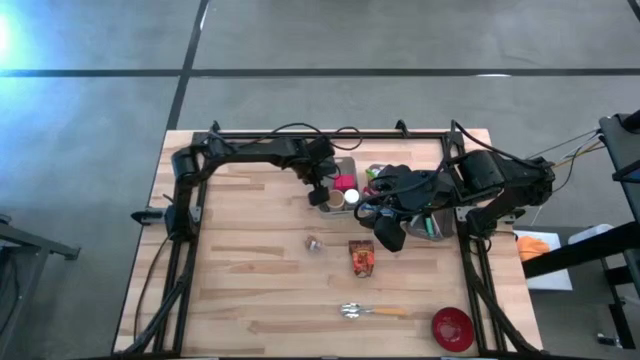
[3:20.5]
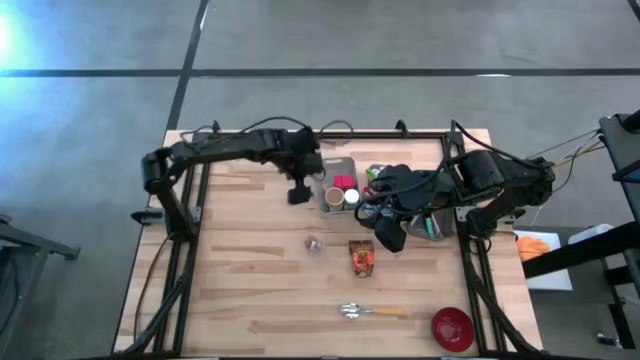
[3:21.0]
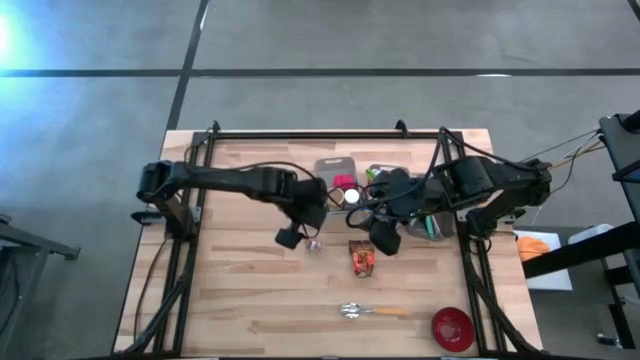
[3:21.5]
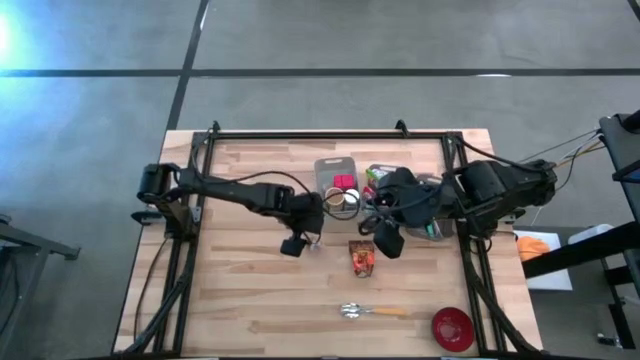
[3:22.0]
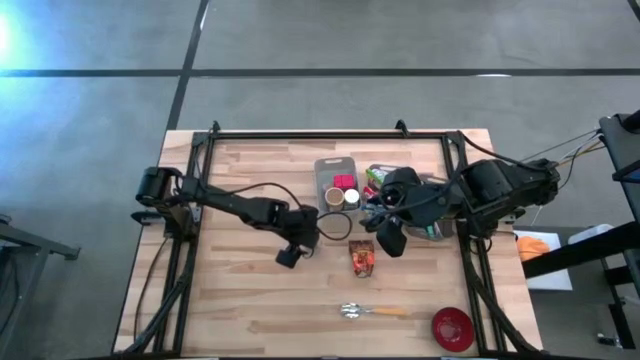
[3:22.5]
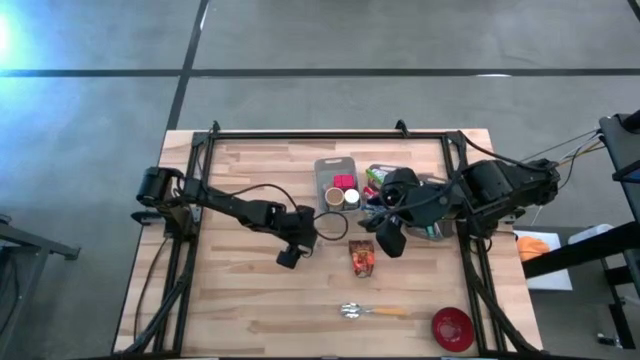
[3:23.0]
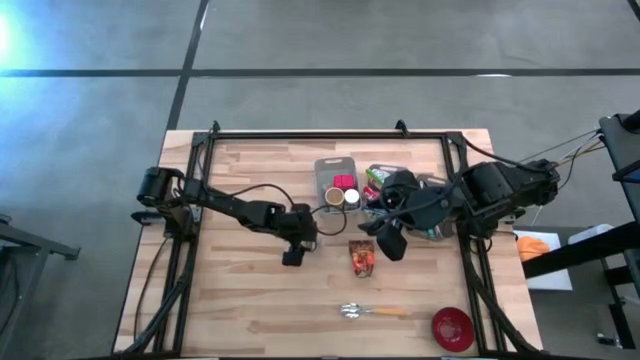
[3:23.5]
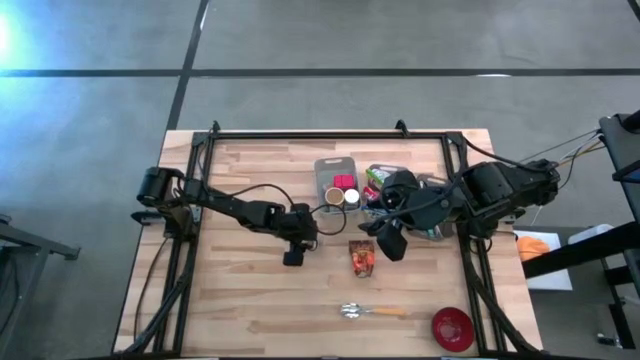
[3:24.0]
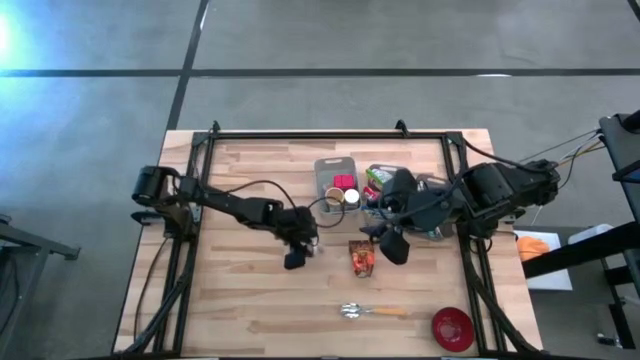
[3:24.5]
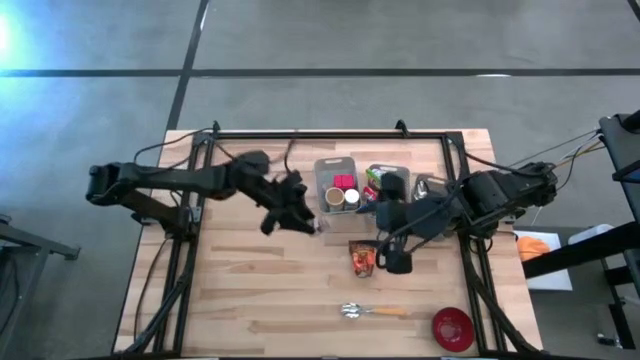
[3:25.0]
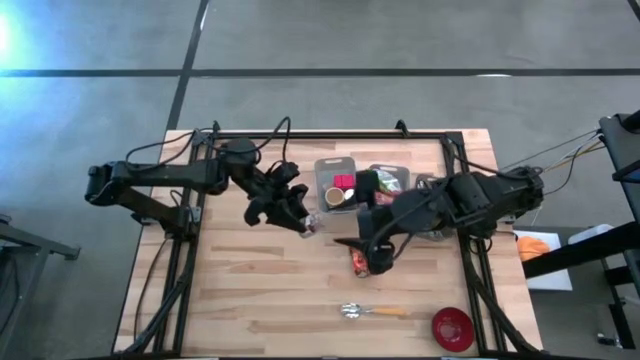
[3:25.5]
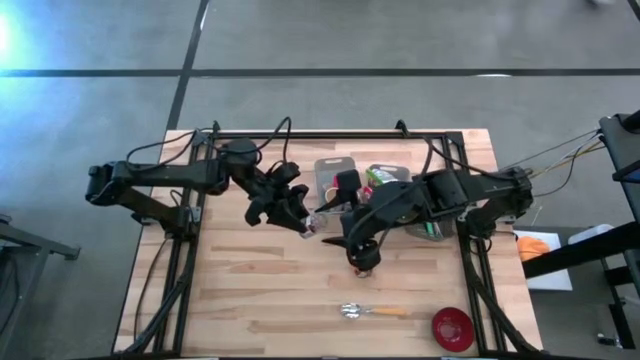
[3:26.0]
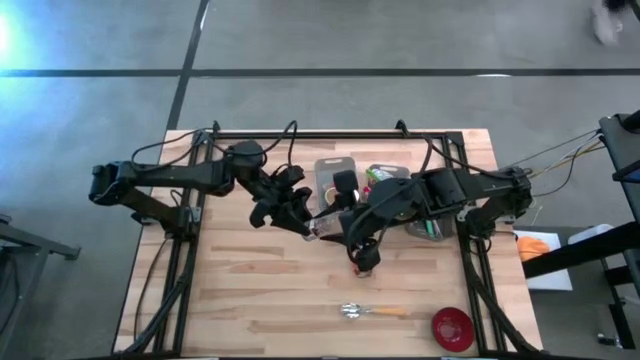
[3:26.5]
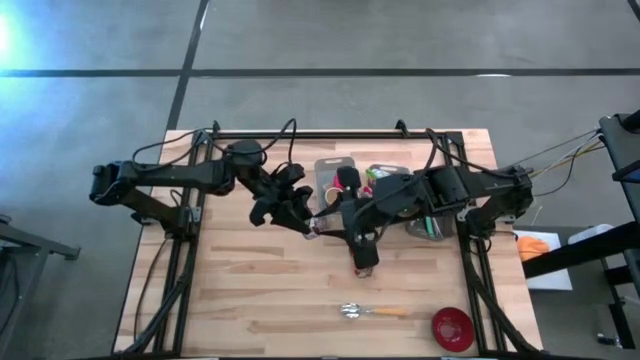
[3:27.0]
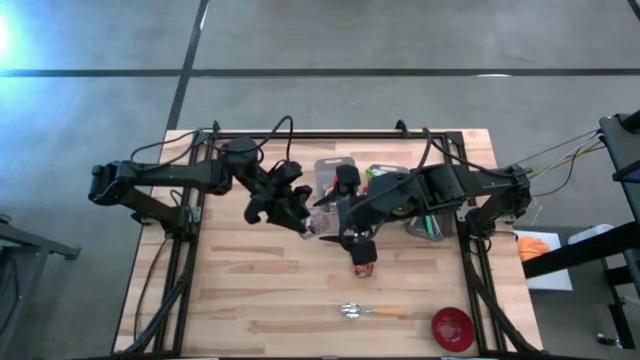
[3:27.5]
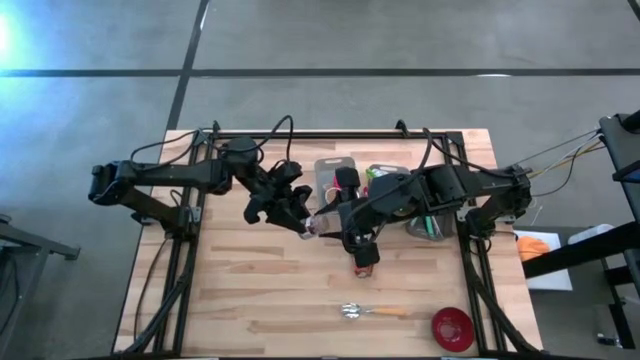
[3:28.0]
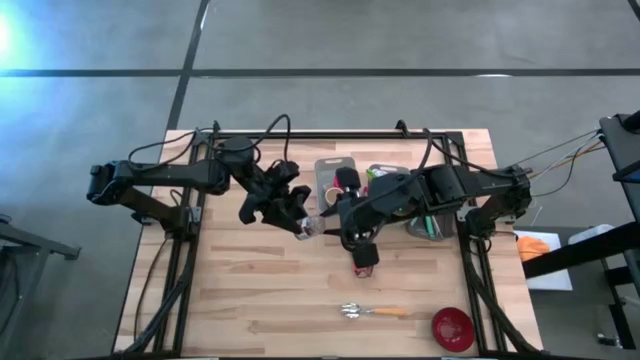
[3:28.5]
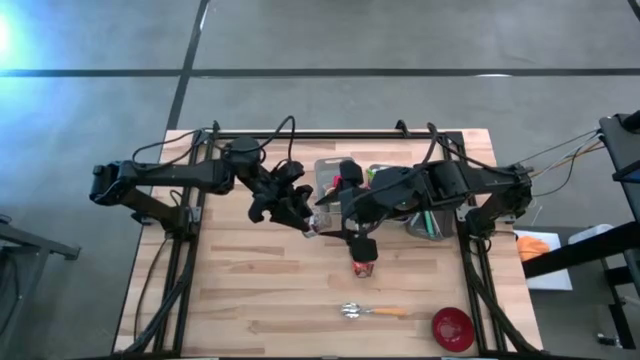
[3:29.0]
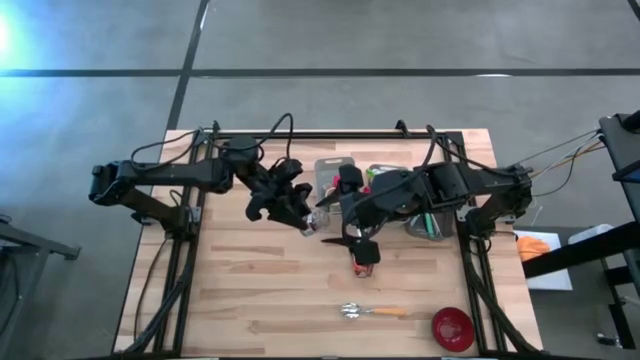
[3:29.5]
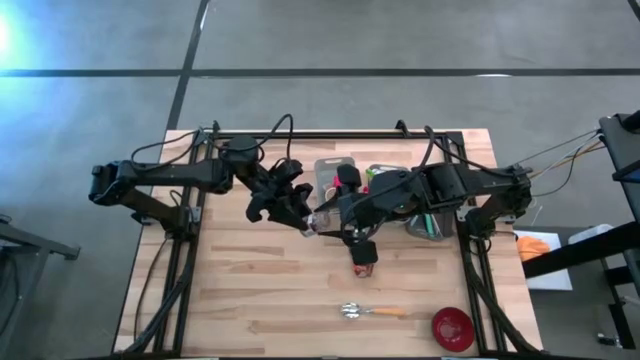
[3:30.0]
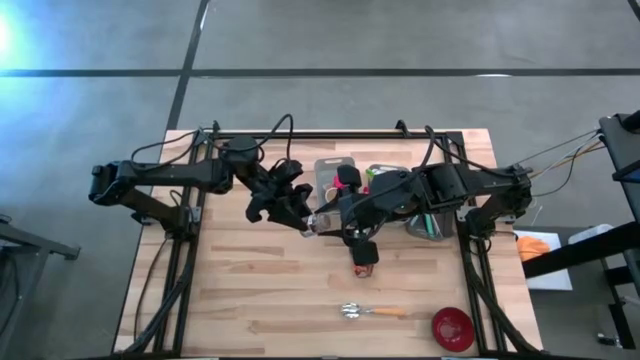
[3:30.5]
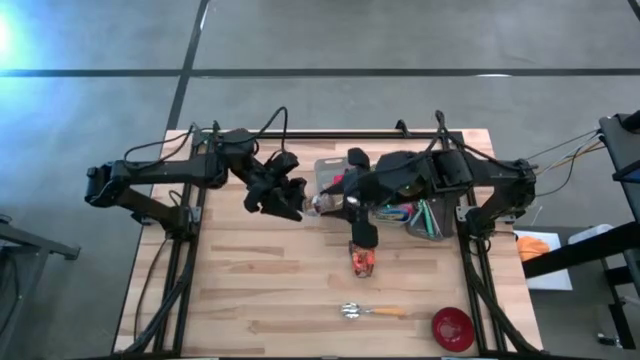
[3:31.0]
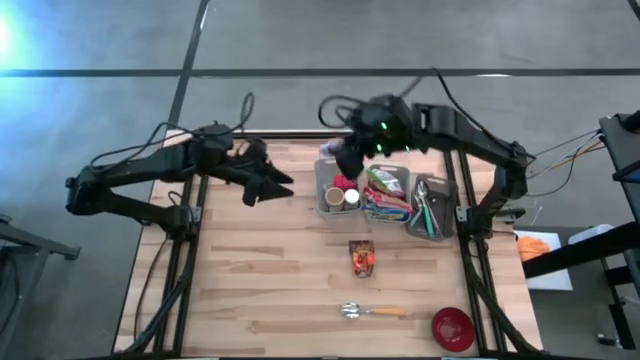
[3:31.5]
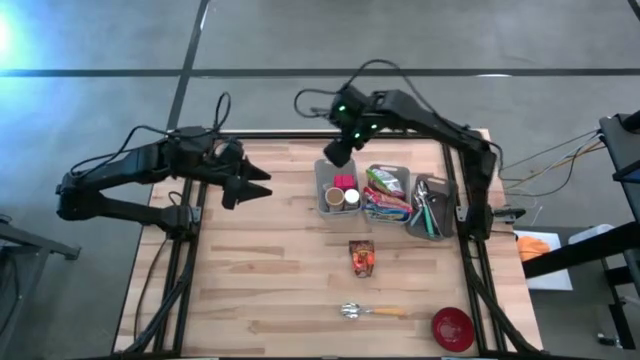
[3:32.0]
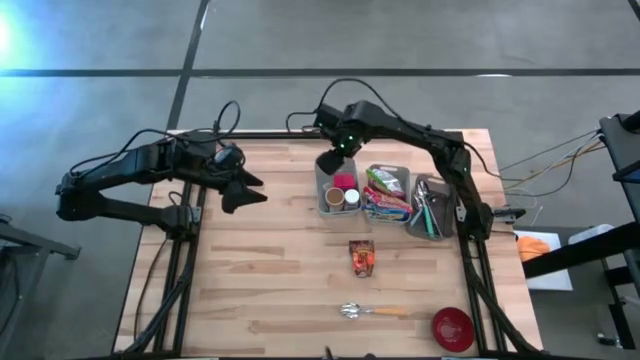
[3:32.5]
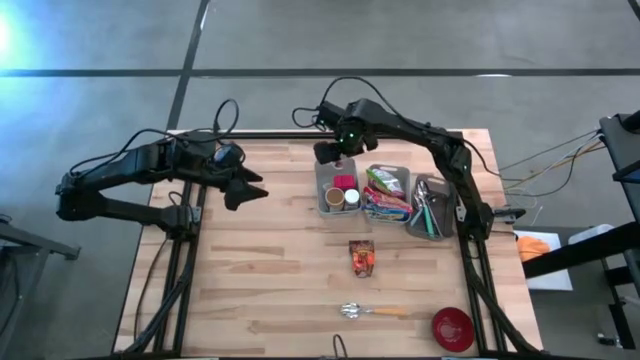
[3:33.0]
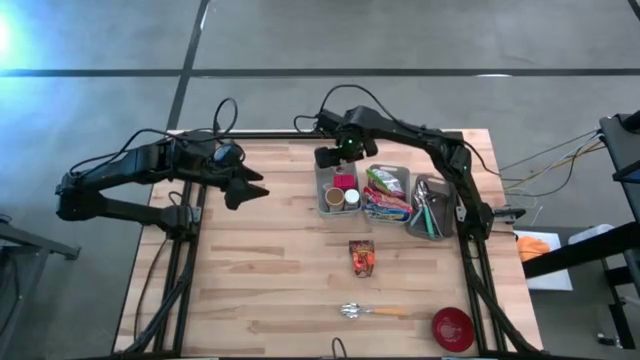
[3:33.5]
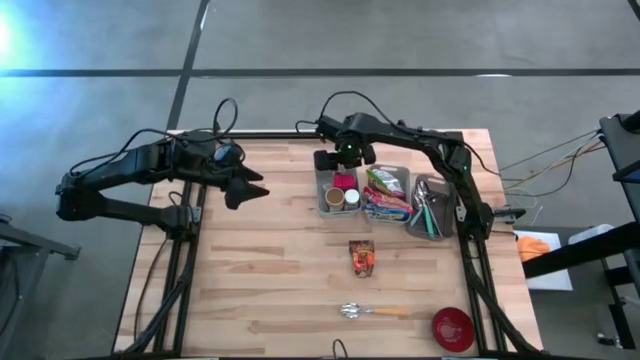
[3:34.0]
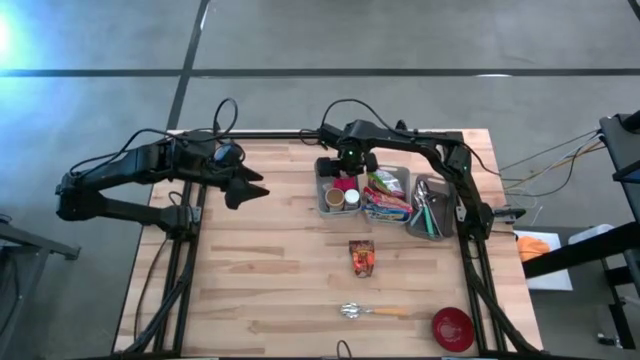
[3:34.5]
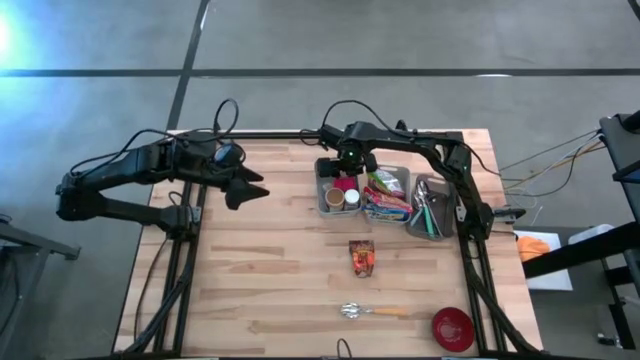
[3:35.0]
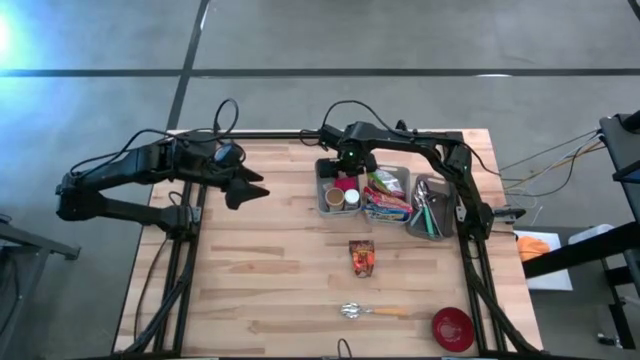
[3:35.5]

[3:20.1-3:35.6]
Put the brown seasoning bottle into the left gray bin

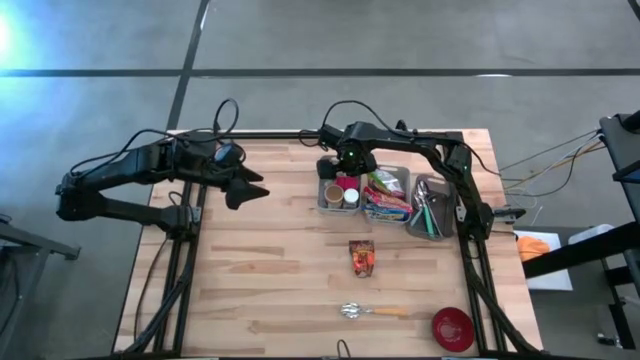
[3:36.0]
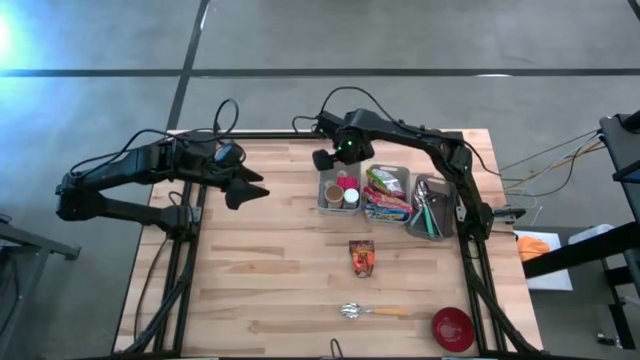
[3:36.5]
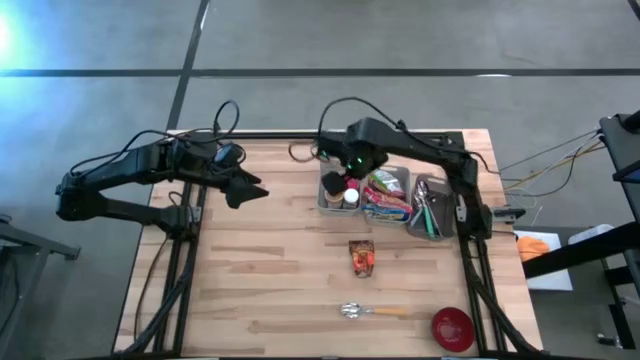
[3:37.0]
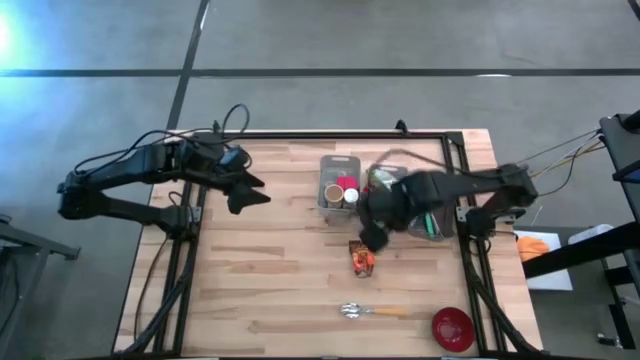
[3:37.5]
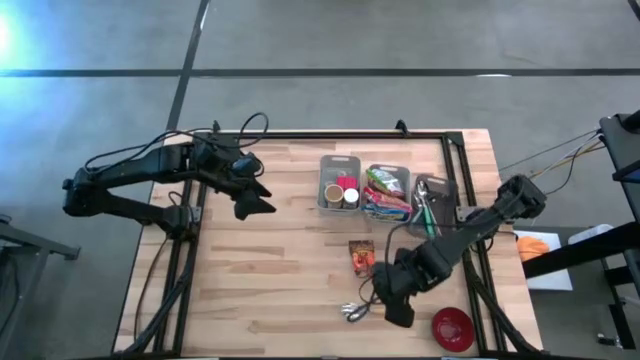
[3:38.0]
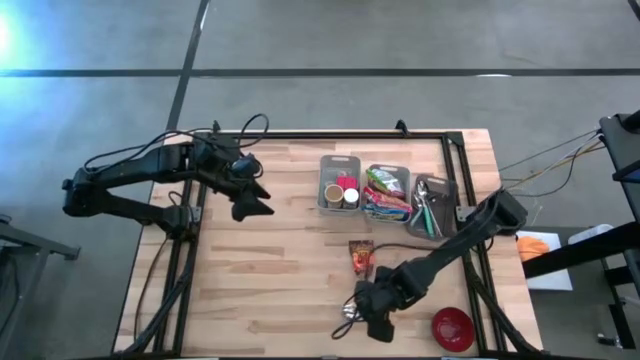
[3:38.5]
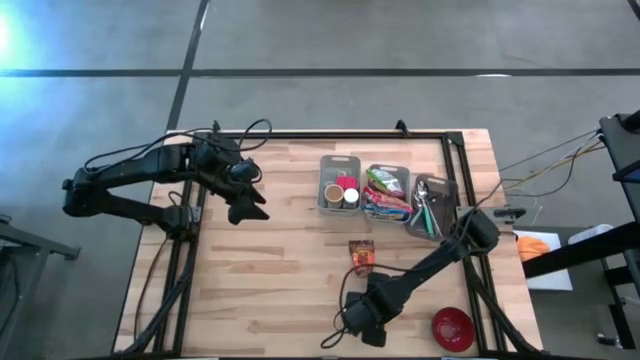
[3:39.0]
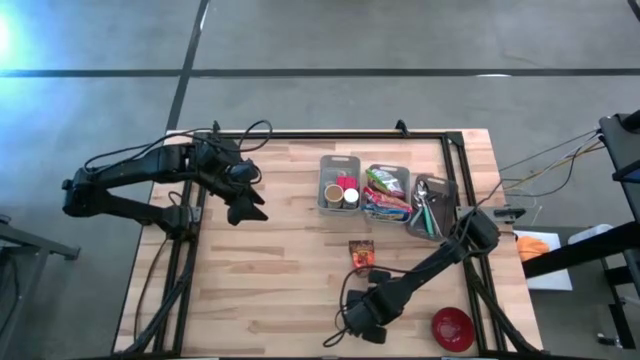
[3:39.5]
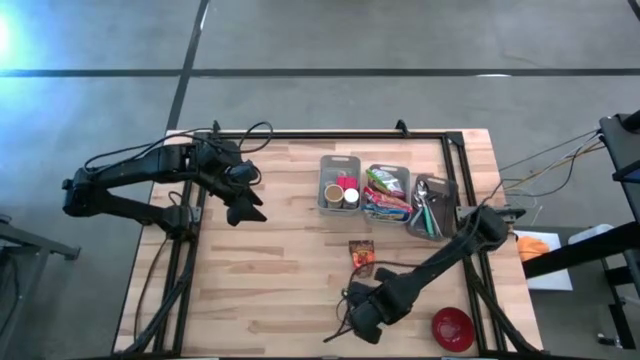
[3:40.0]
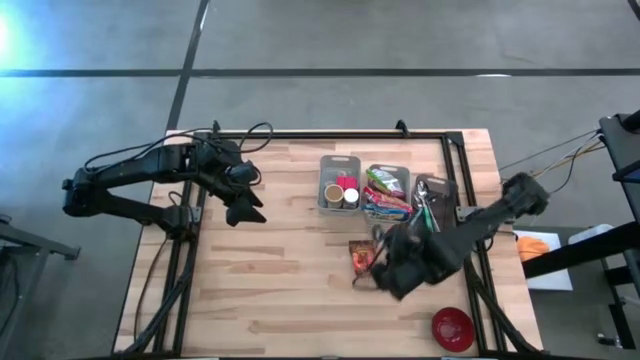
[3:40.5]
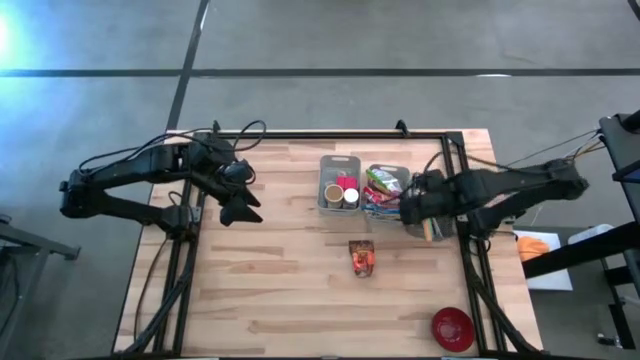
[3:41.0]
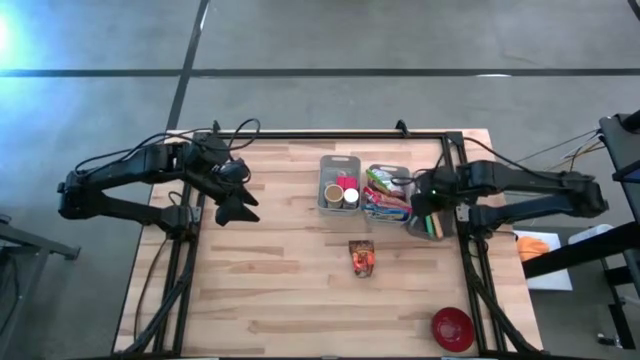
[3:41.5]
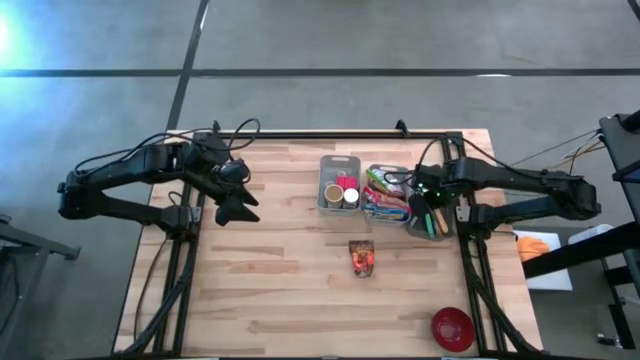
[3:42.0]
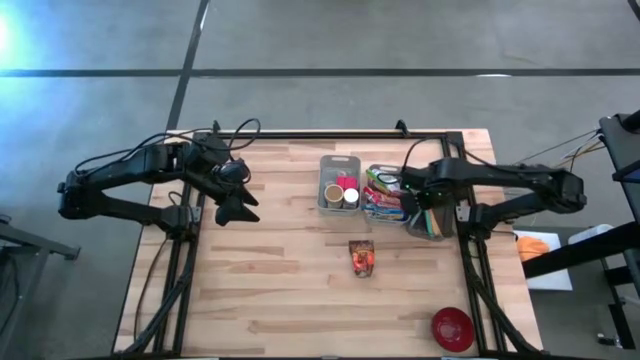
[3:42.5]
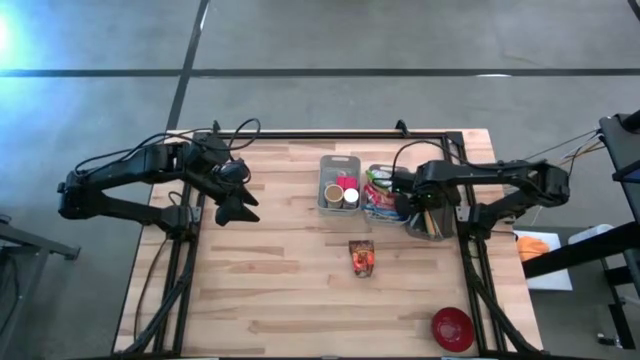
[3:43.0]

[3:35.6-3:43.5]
Put the orange spoon into the black bin
